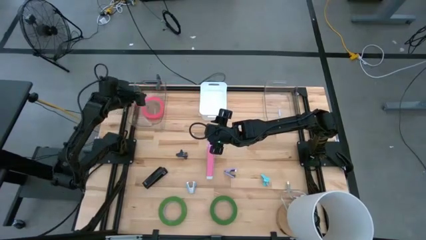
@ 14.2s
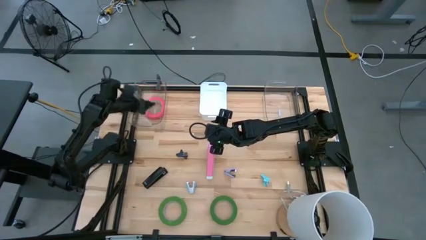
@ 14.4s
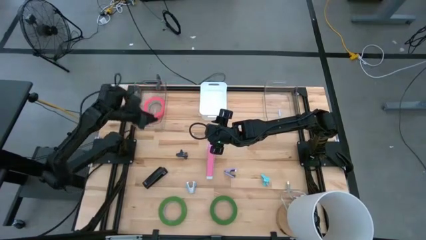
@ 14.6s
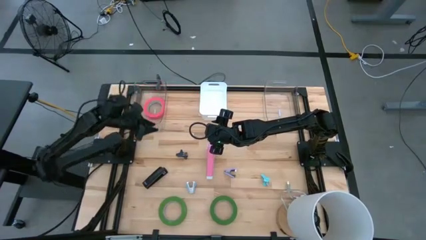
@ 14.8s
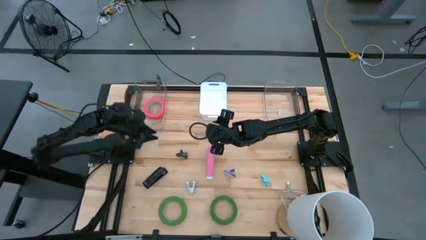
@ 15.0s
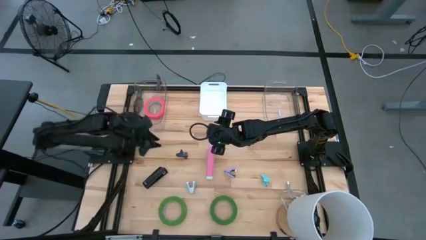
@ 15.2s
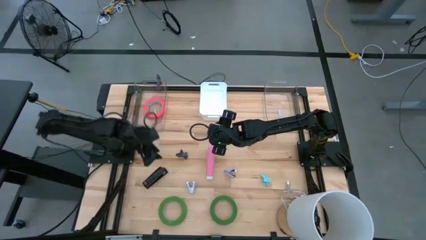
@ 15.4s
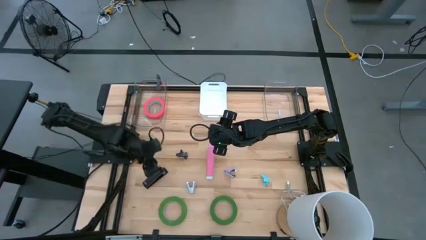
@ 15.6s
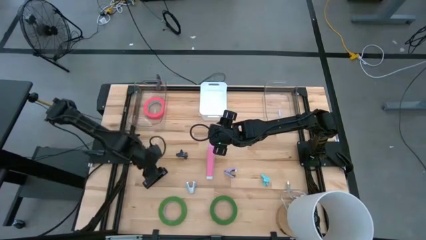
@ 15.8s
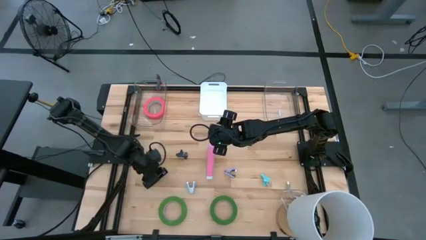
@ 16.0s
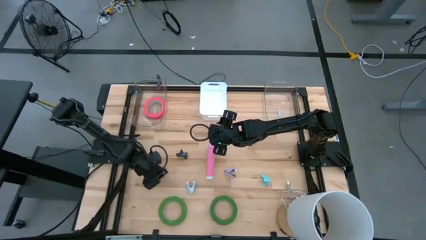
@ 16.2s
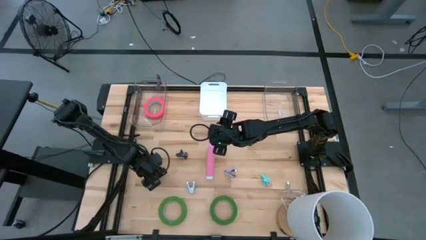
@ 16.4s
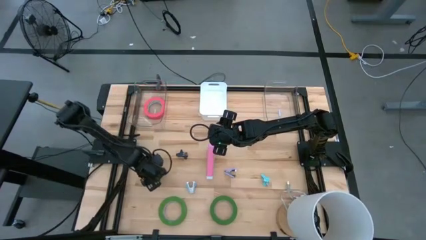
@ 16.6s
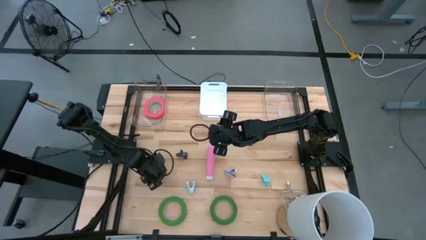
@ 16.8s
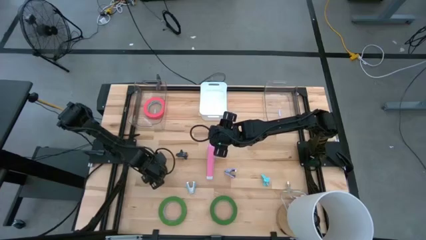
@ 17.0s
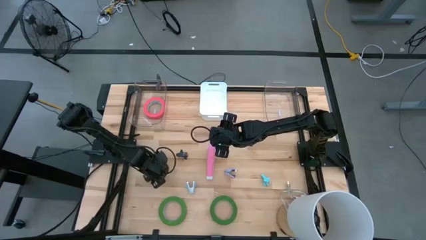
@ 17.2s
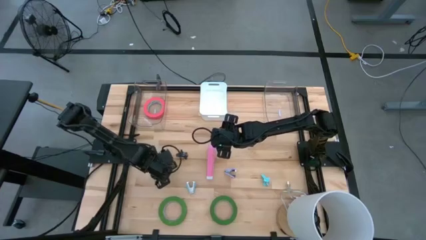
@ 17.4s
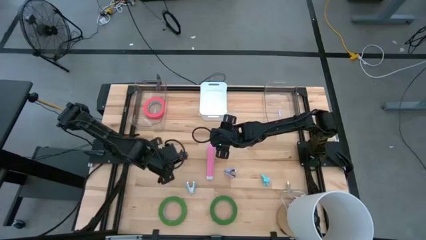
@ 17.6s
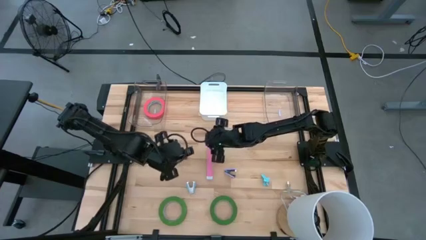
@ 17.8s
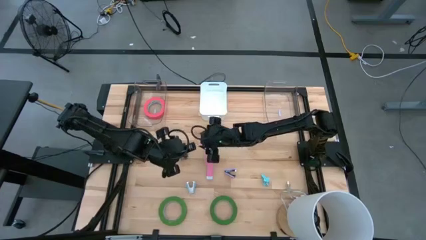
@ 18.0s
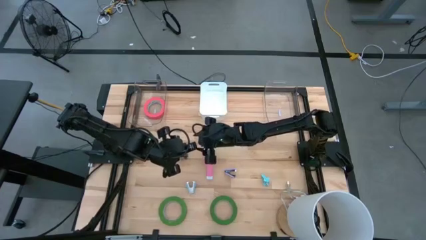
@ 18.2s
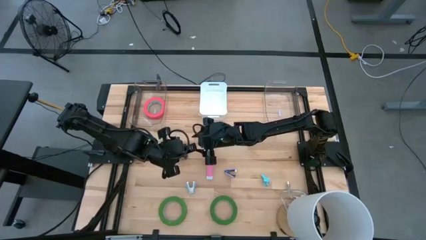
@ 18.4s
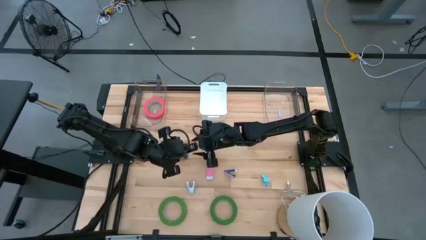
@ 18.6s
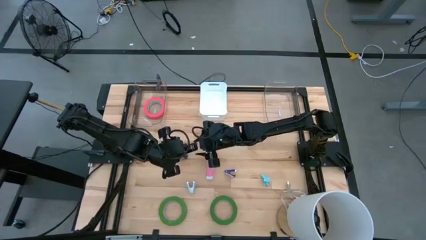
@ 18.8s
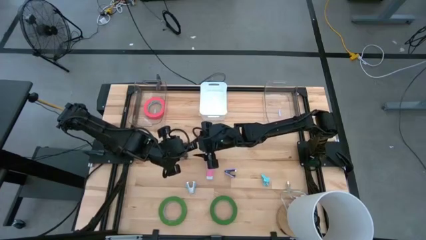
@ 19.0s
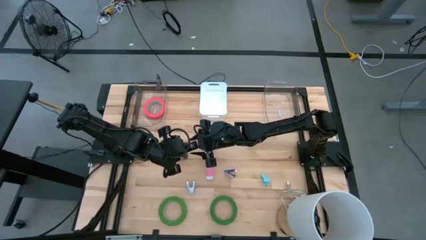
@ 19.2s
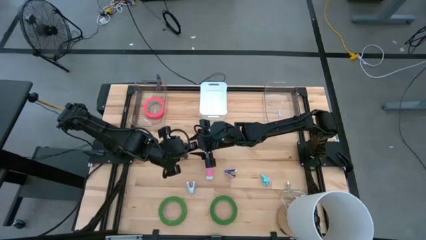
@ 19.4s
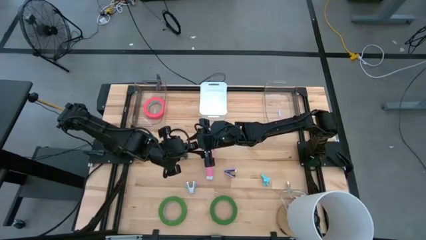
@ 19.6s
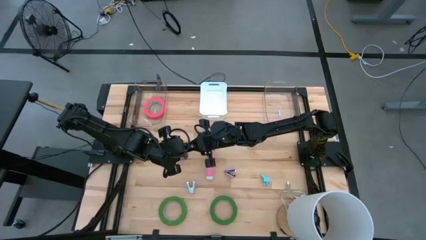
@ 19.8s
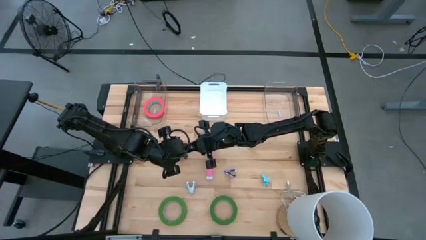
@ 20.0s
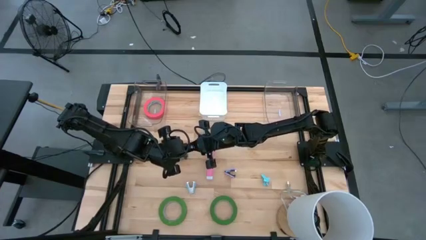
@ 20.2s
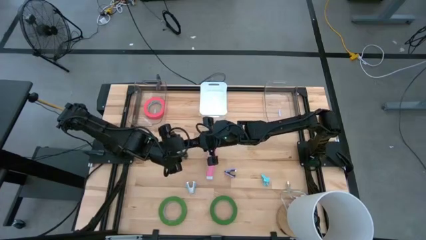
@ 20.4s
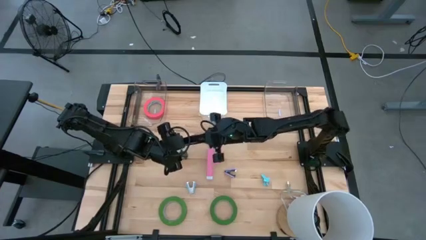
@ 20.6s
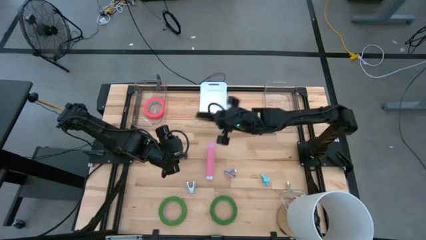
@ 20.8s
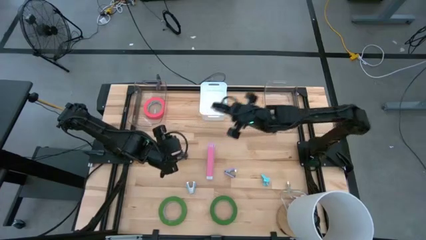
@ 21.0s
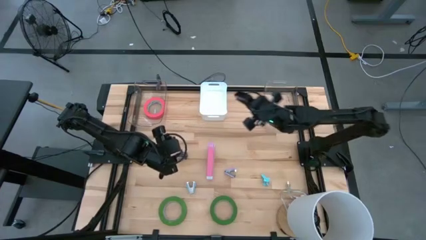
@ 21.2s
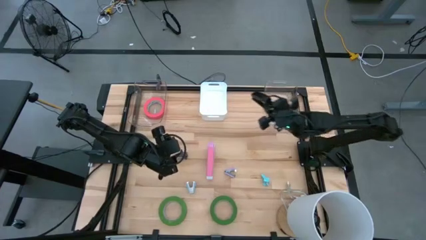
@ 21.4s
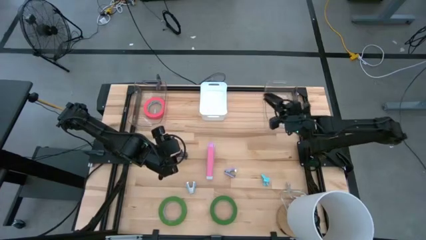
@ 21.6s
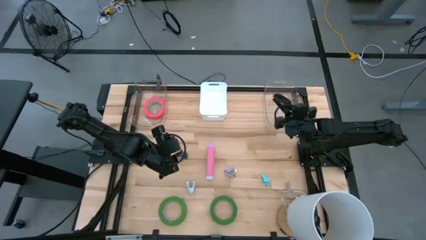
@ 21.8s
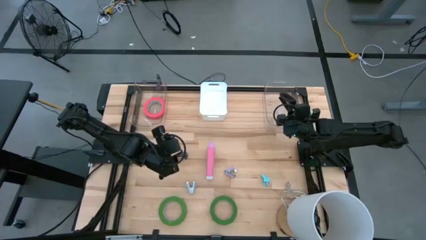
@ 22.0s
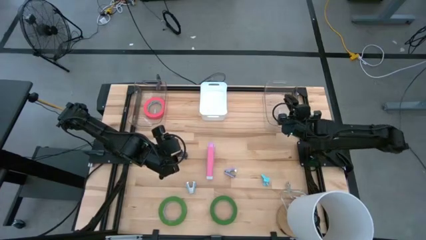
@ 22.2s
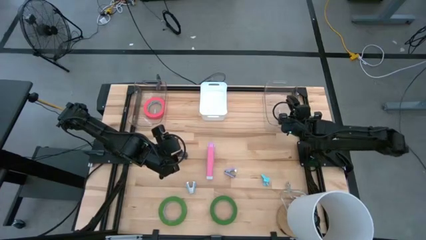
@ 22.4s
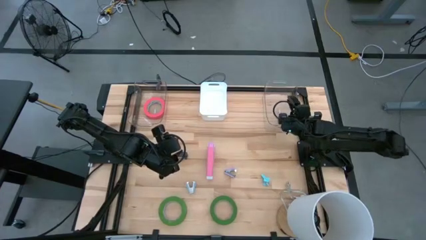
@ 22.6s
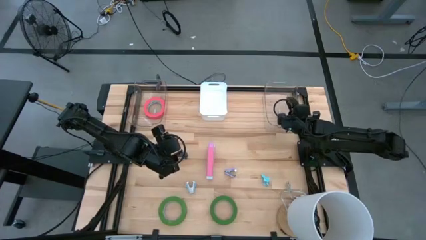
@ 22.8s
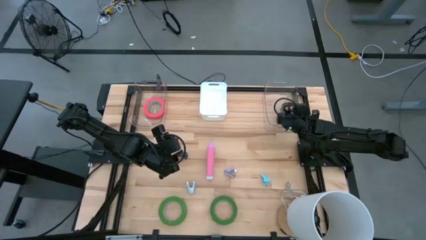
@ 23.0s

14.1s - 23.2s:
Task: Pick and place Stapler, Stapler remover, tape
Put the black stapler into the right transparent bin

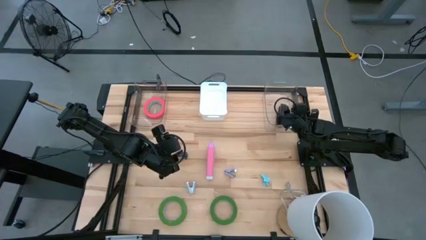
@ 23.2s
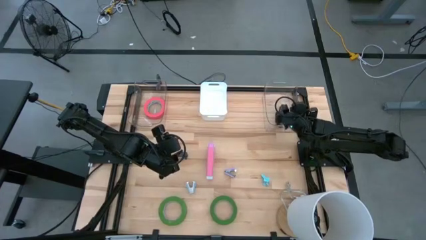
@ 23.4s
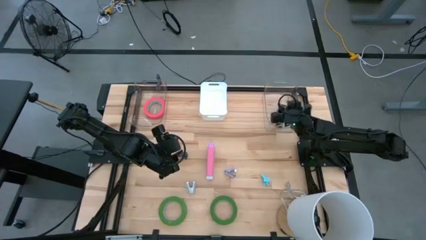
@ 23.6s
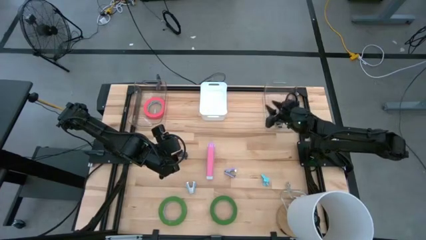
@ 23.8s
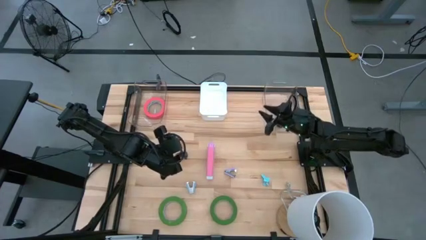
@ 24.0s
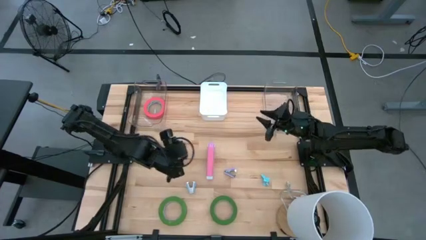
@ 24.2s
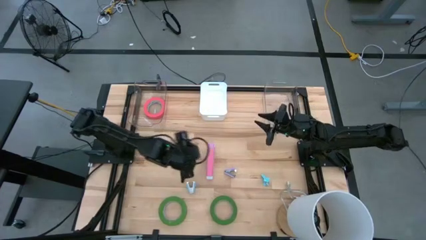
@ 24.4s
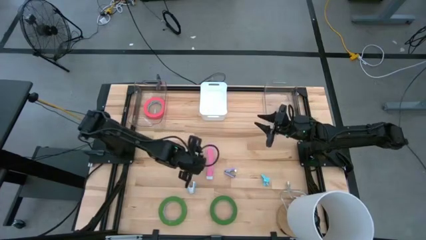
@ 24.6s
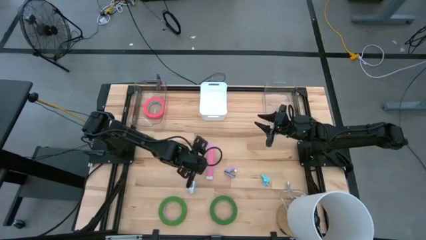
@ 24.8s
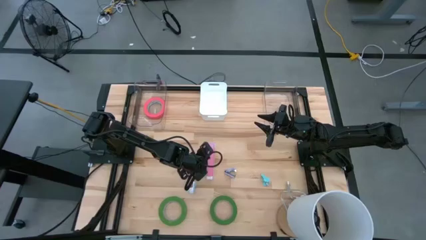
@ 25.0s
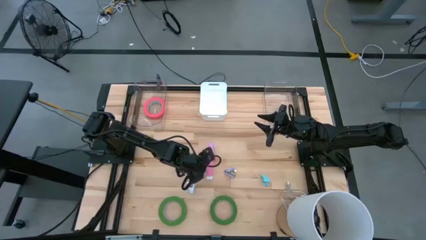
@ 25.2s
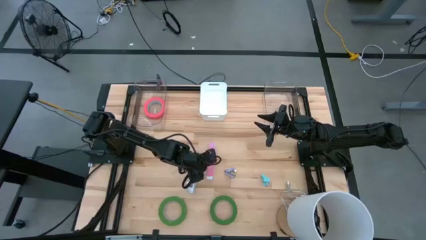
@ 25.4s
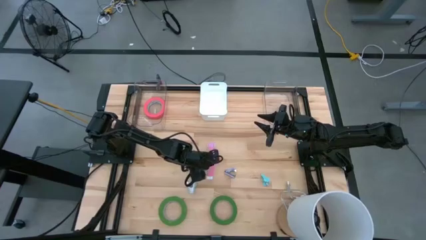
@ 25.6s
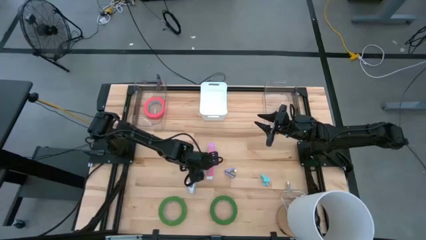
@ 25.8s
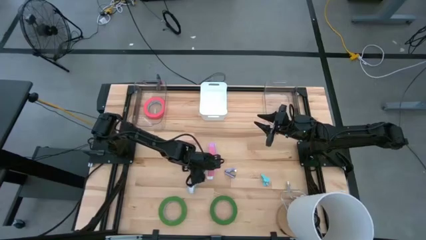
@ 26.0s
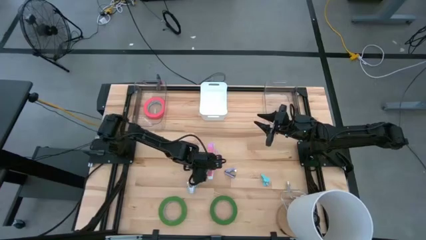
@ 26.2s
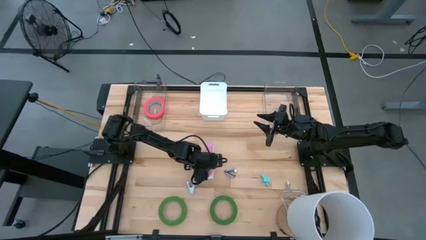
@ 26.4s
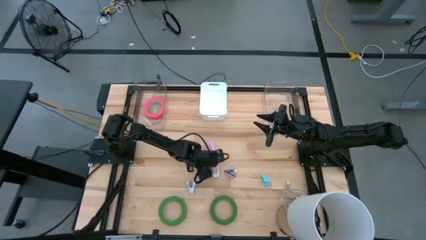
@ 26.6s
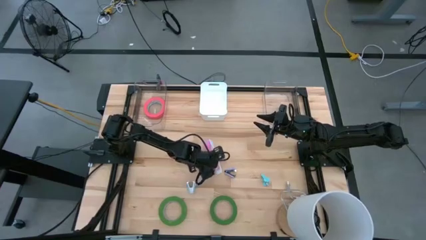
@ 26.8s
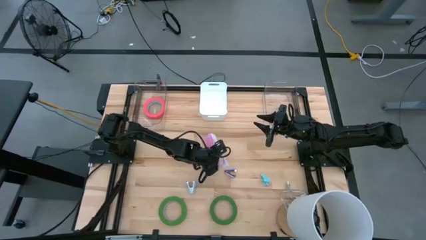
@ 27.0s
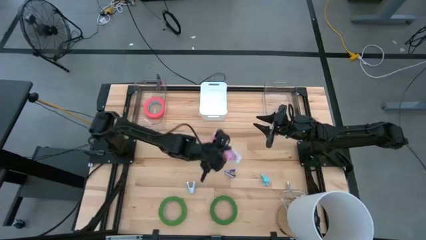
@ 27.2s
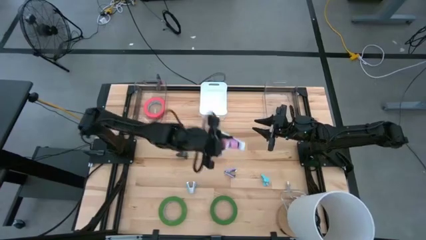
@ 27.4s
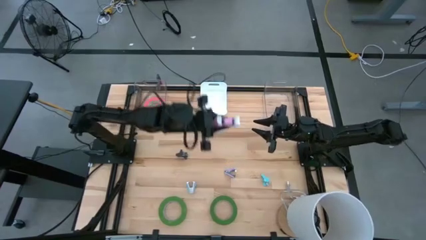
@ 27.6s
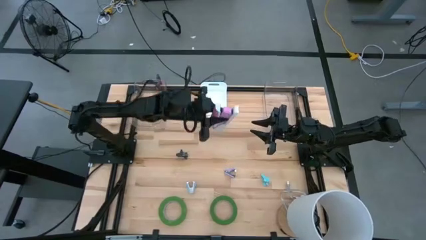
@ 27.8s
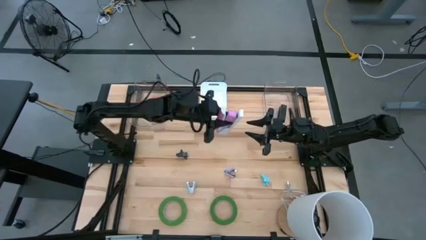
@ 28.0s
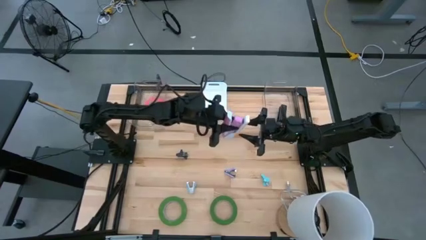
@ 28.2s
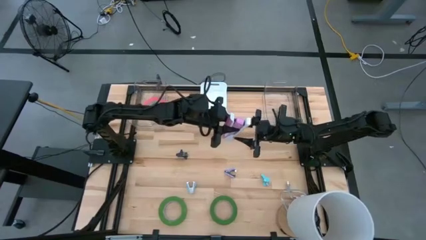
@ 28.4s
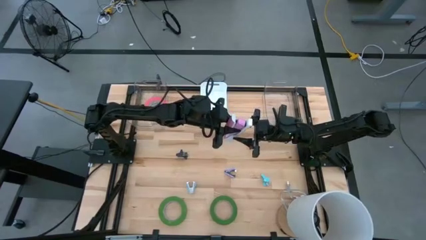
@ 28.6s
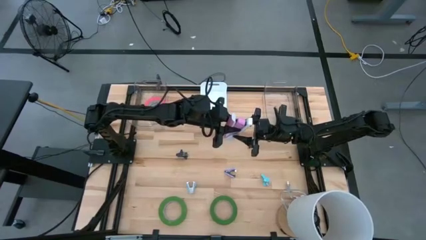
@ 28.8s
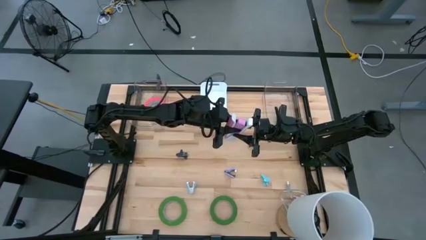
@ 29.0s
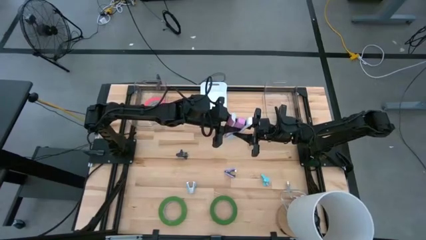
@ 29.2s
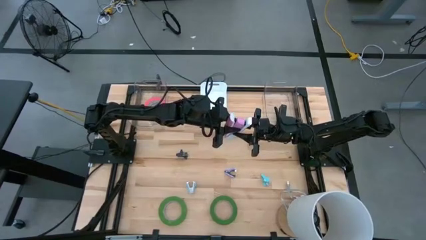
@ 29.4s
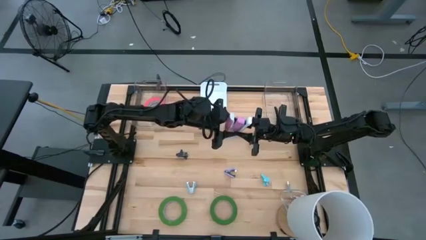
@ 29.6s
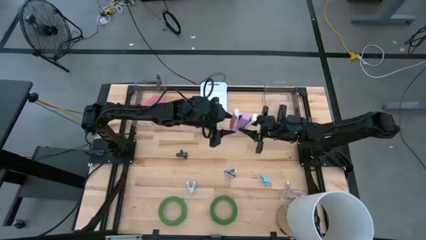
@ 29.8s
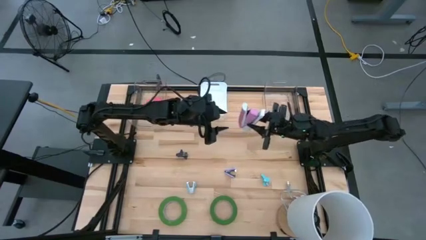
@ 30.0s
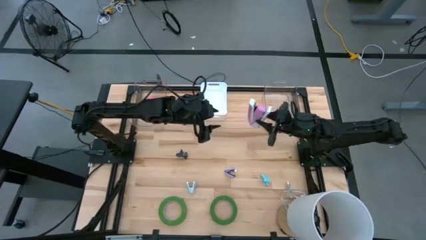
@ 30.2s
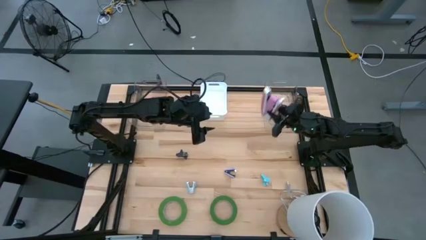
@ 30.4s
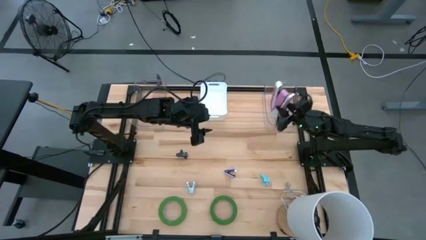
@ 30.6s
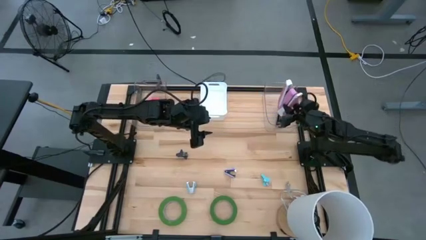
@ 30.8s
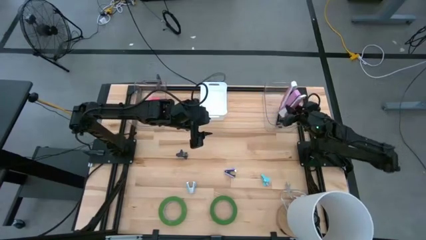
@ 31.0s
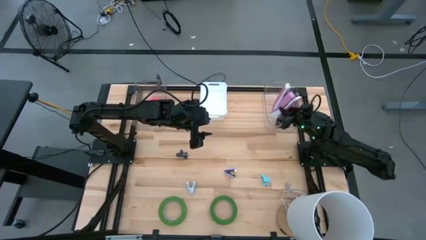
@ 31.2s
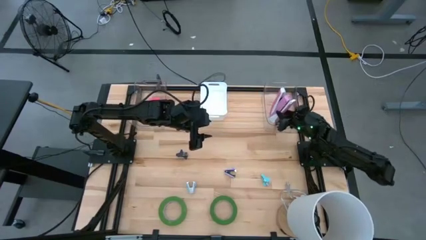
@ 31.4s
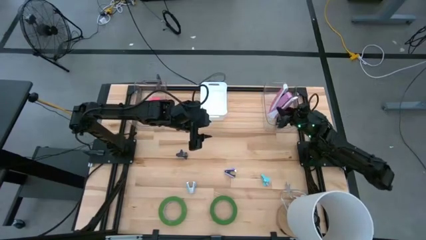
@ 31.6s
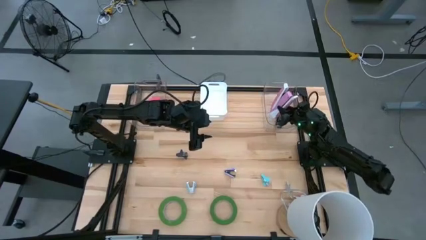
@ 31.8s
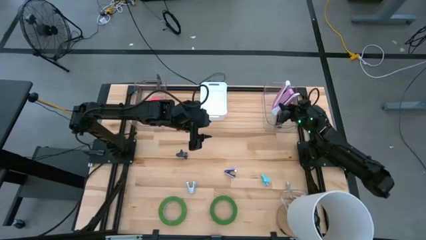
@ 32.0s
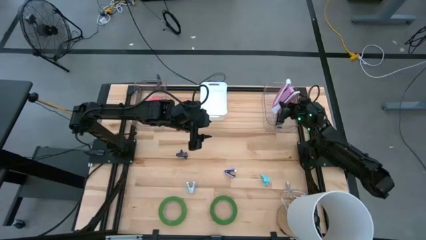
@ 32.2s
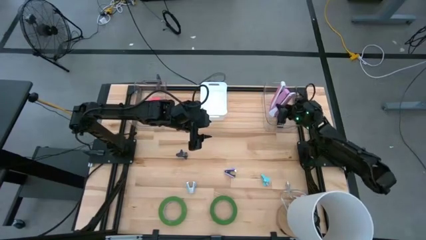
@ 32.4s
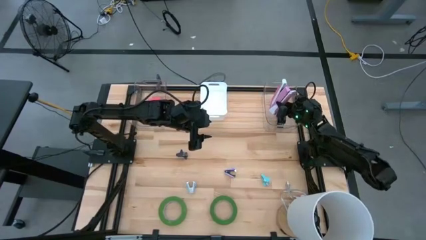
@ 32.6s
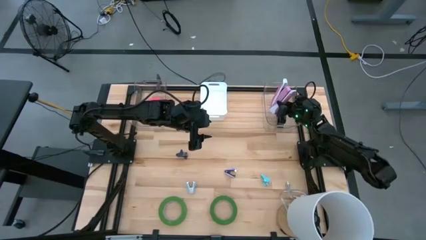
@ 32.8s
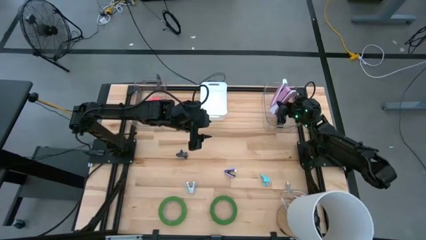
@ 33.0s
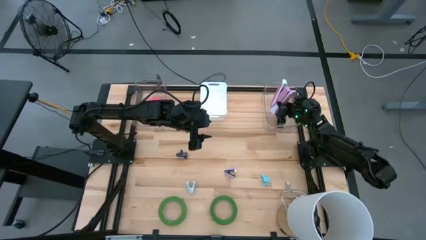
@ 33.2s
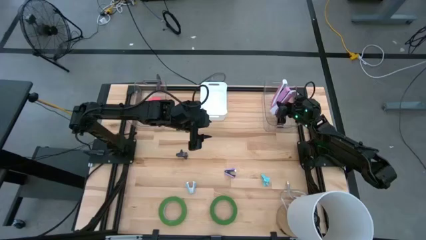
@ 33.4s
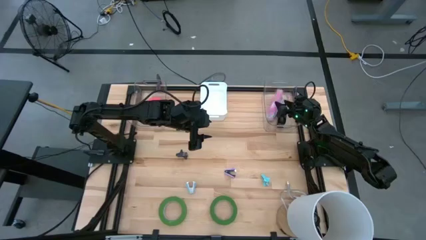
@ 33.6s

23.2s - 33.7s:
Put the pink stapler into the right transparent bin
